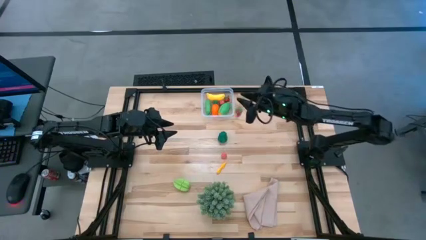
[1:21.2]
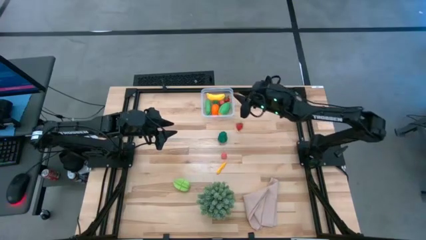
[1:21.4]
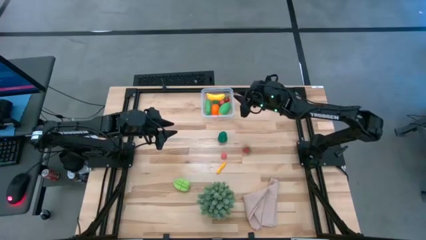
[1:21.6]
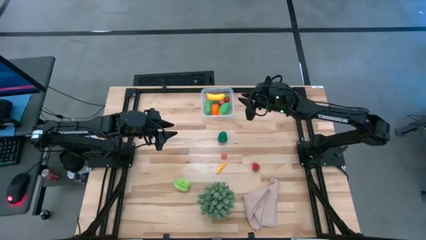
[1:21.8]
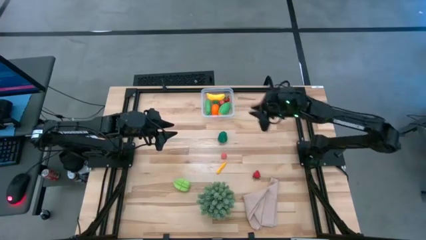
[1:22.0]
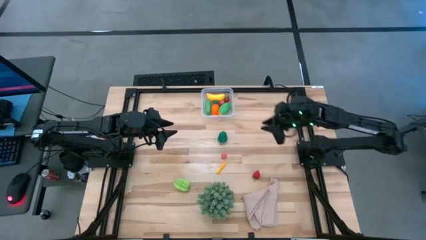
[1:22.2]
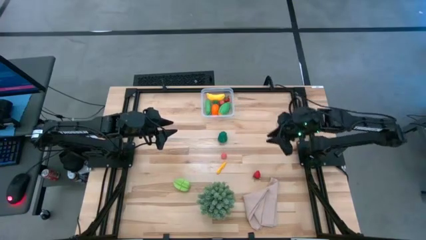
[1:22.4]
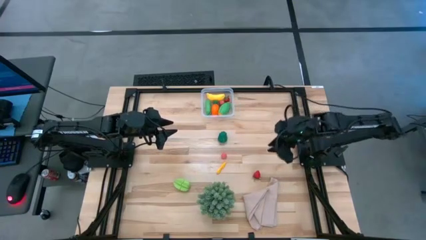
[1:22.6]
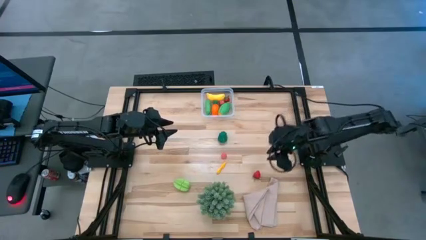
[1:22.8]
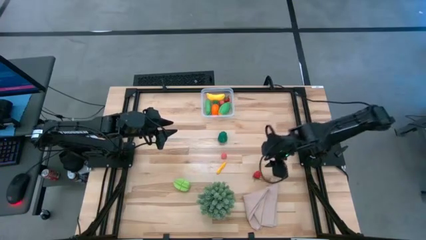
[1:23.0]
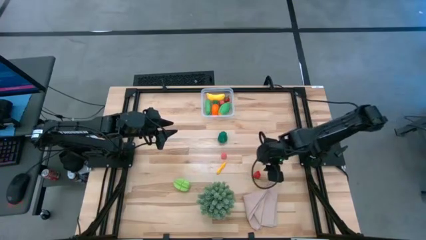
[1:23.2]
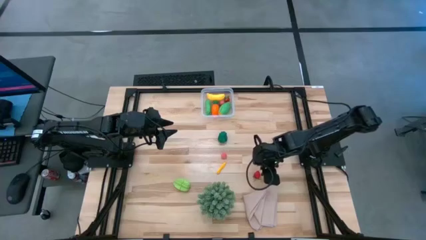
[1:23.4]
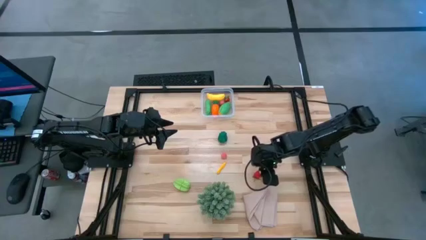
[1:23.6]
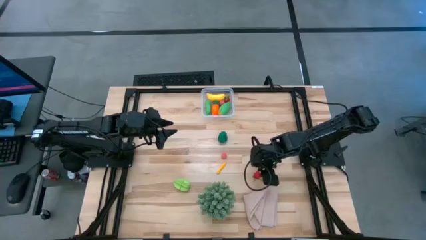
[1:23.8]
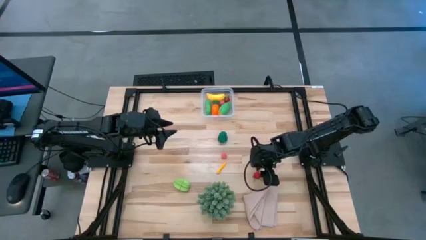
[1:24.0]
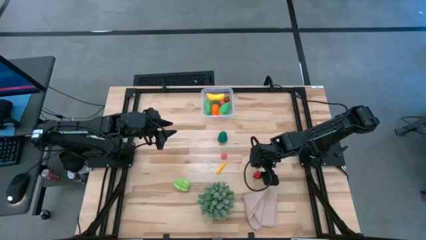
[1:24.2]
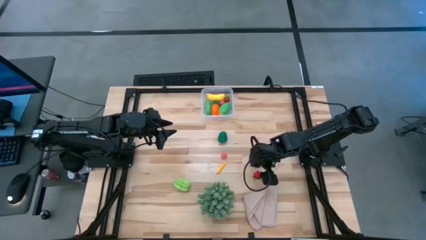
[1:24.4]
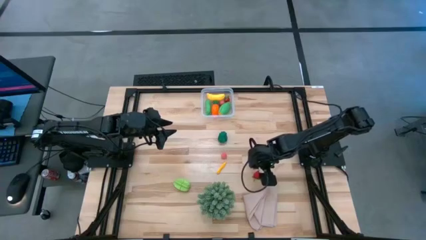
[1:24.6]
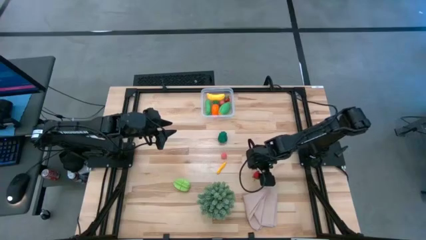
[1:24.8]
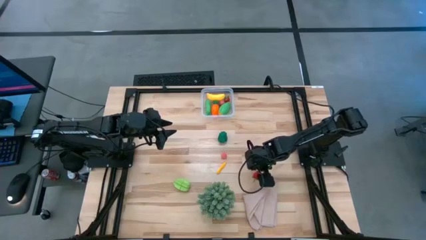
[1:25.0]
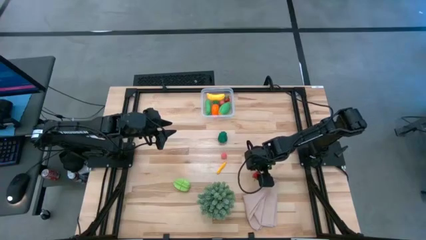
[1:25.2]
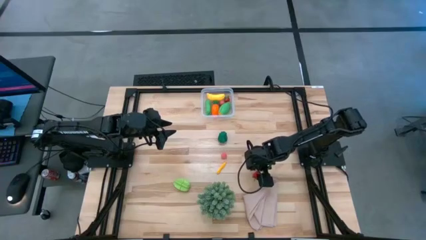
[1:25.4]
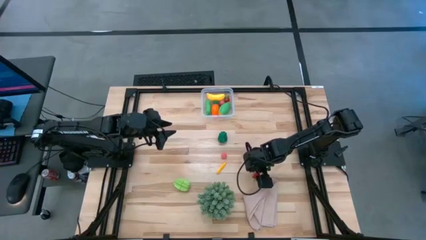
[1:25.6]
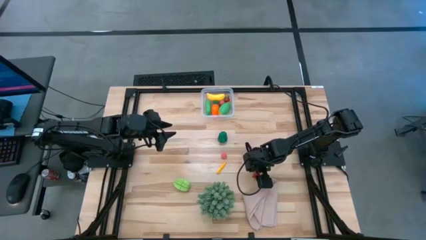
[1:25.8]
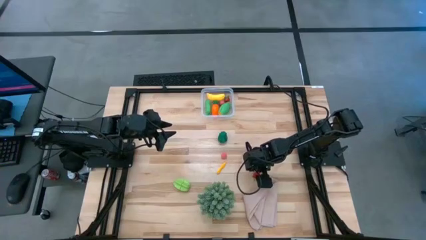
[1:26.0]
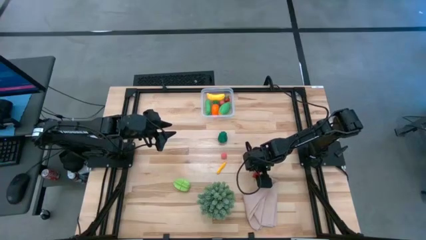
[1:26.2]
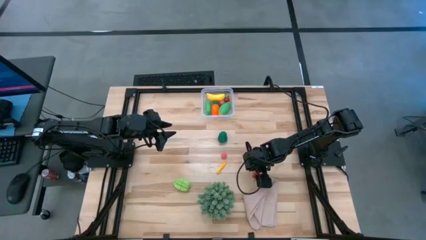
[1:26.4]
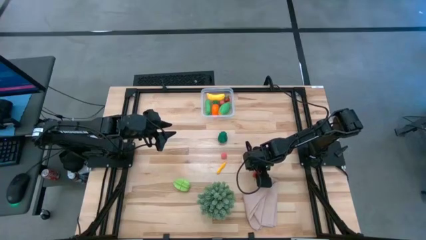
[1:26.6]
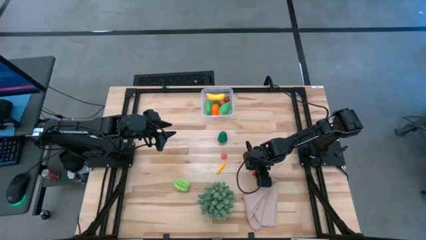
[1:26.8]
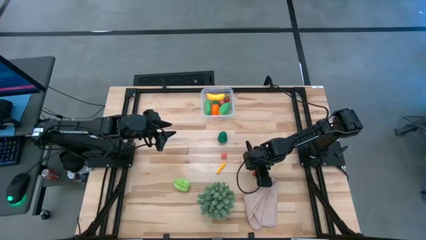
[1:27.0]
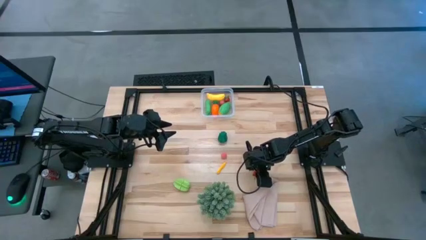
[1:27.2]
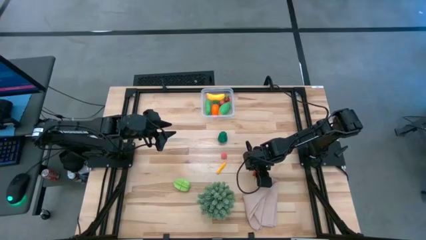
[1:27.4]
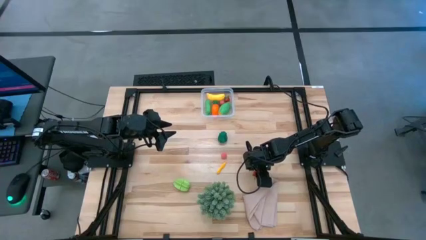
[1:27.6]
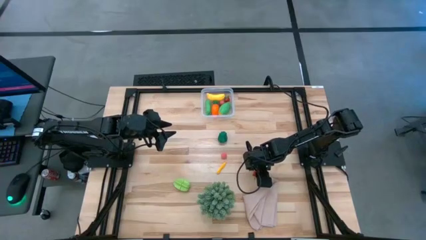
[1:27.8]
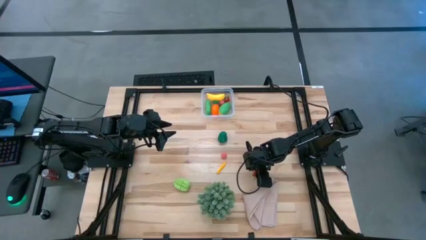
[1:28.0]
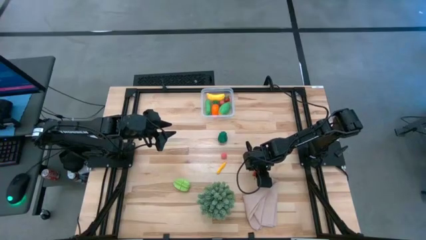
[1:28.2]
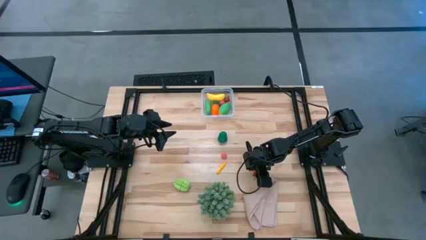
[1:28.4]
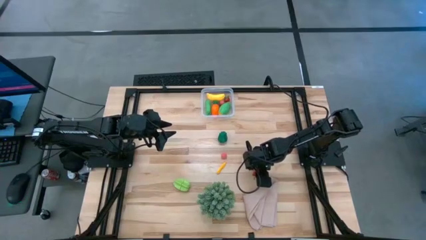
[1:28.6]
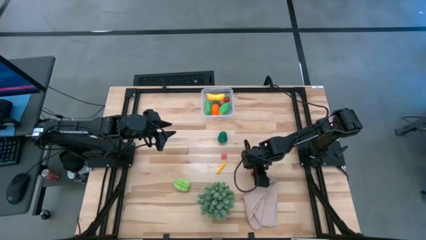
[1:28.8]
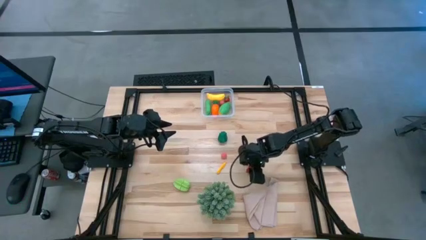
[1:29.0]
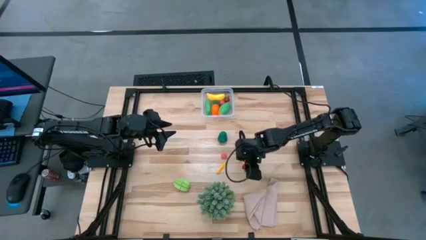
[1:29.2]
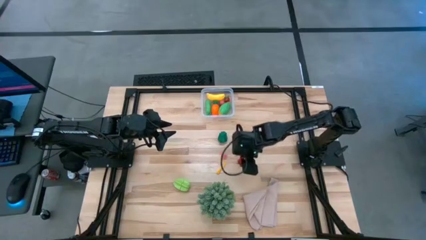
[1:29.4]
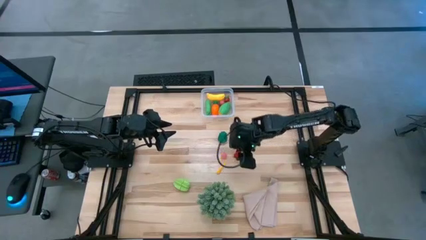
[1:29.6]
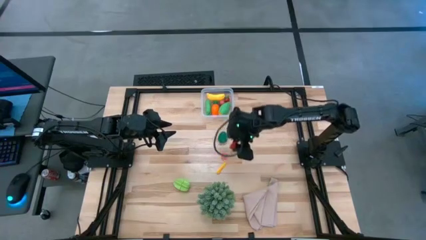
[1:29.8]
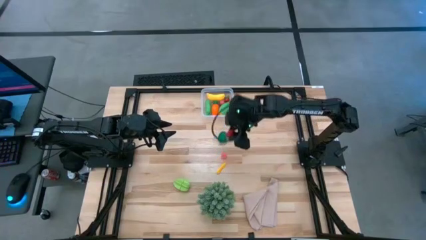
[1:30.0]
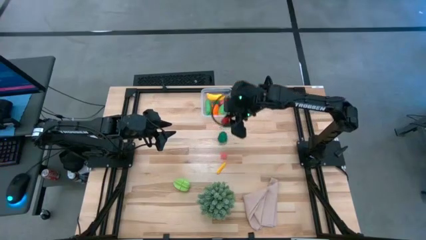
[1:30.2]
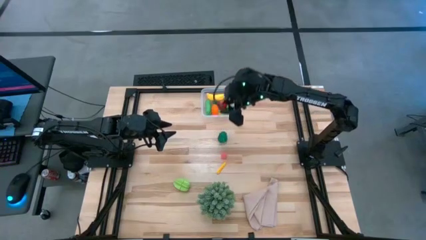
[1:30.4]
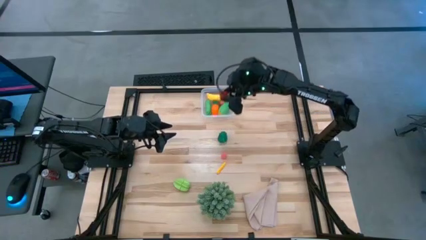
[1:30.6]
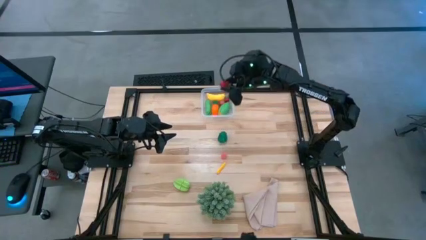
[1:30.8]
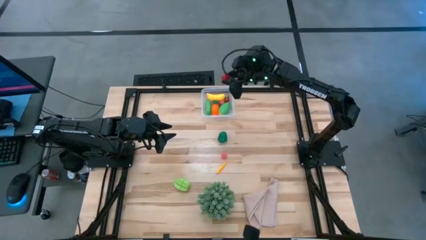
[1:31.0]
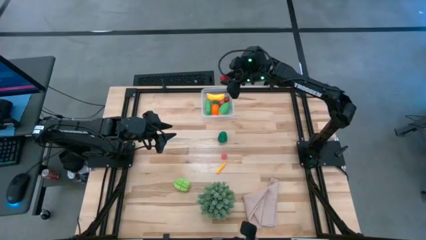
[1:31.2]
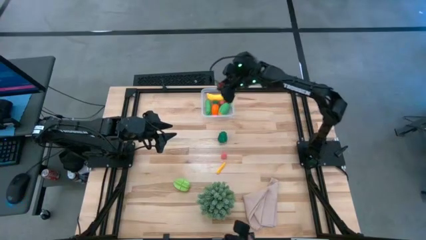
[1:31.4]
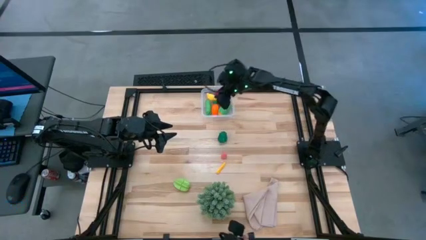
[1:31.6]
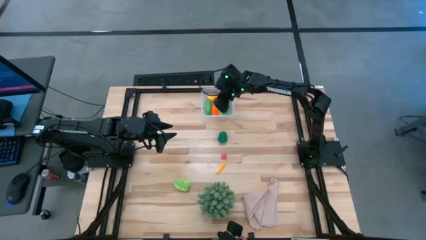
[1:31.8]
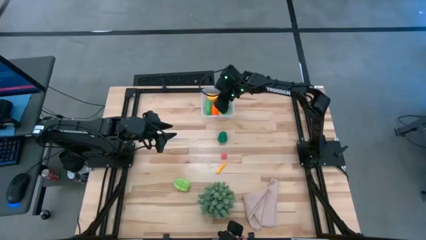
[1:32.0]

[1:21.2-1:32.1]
Task: Pick and placing Produce into tupperware
Put the strawberry into the transparent bin

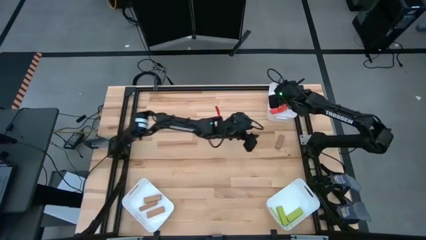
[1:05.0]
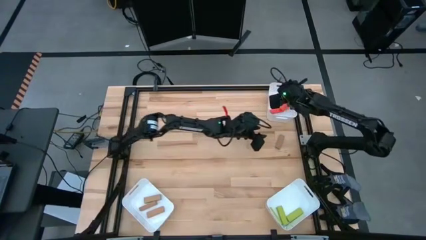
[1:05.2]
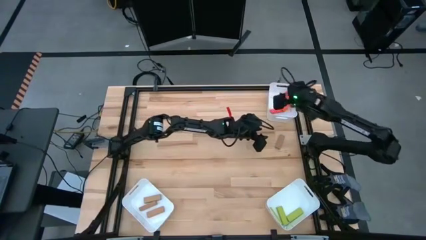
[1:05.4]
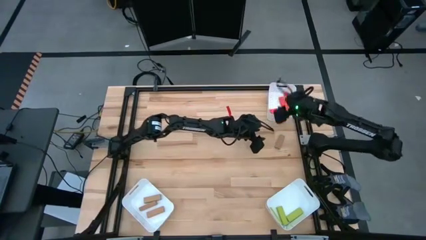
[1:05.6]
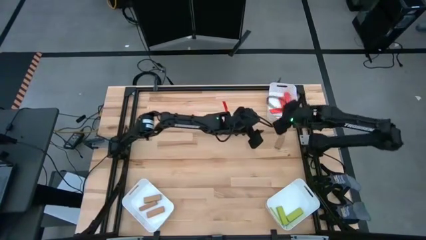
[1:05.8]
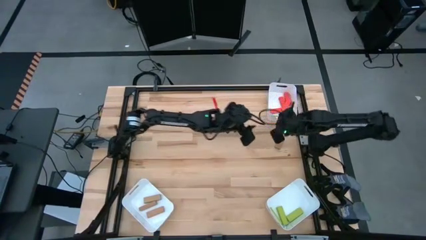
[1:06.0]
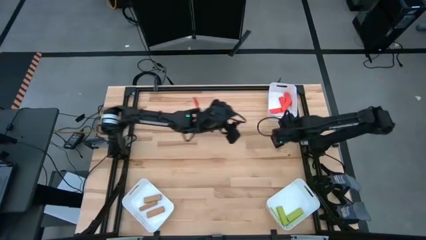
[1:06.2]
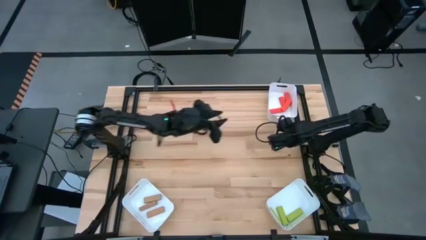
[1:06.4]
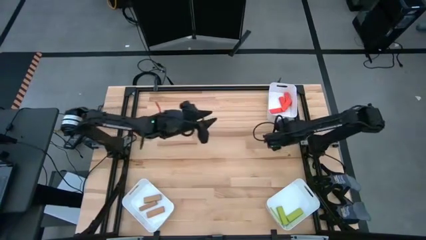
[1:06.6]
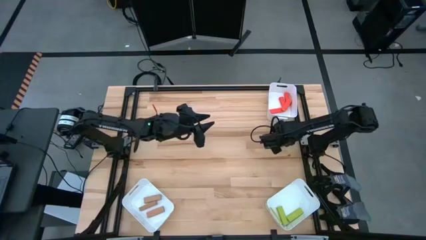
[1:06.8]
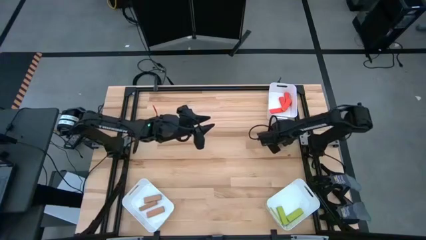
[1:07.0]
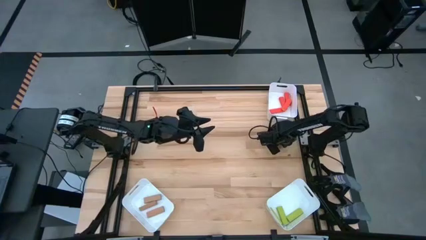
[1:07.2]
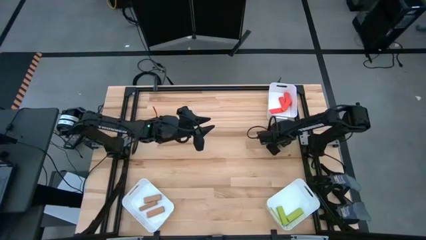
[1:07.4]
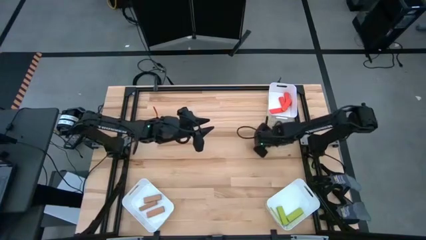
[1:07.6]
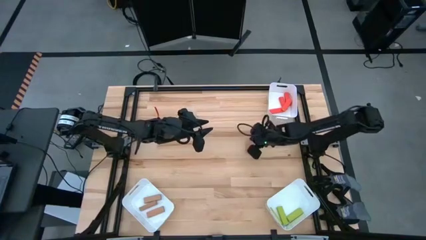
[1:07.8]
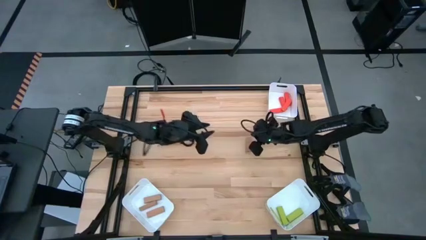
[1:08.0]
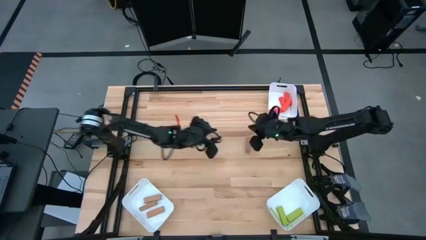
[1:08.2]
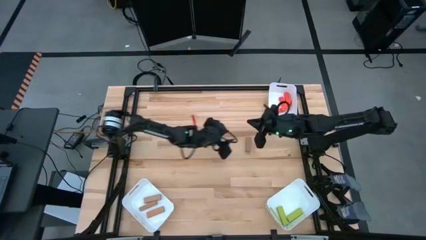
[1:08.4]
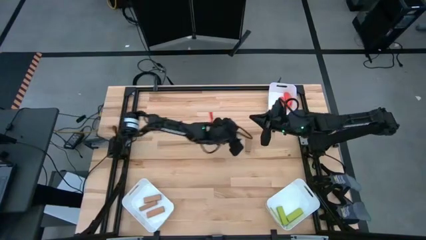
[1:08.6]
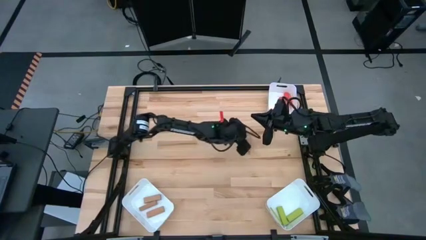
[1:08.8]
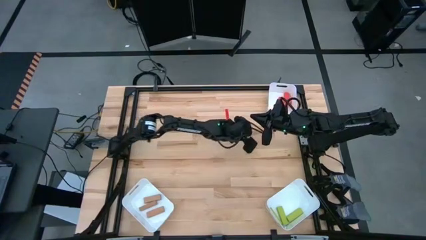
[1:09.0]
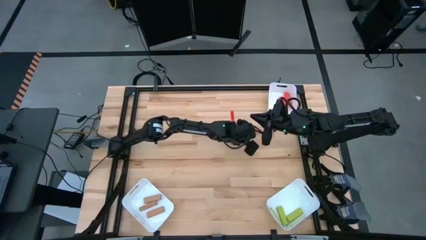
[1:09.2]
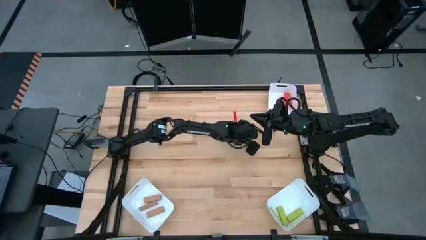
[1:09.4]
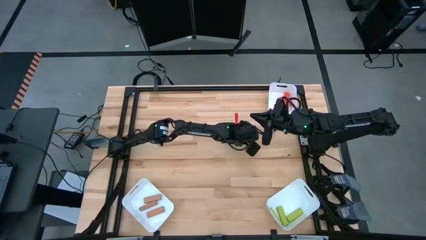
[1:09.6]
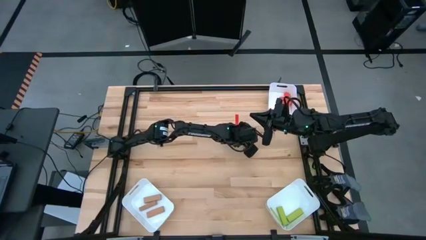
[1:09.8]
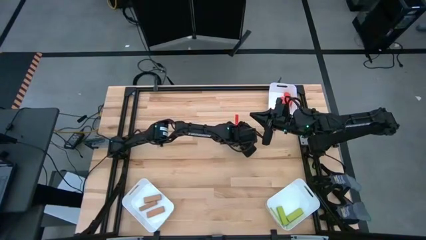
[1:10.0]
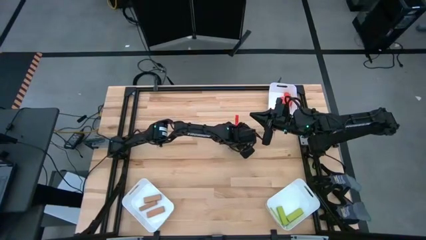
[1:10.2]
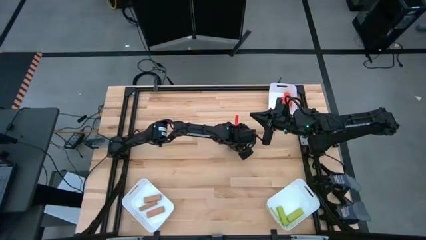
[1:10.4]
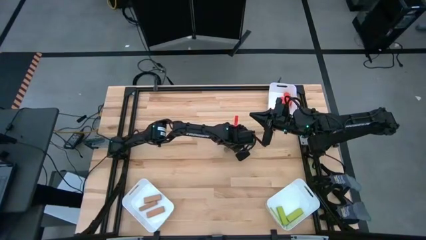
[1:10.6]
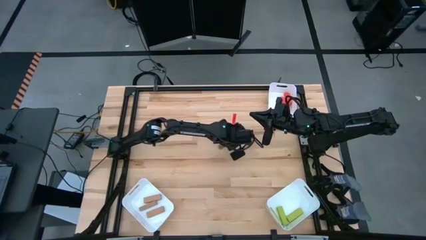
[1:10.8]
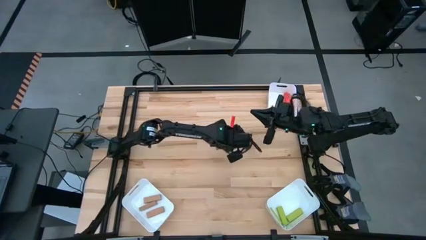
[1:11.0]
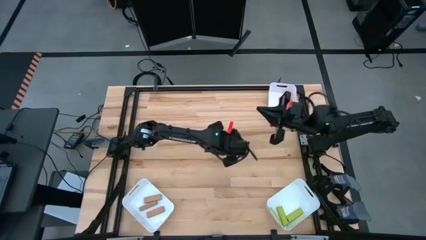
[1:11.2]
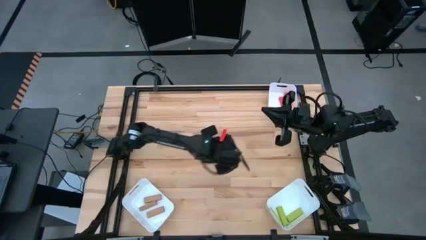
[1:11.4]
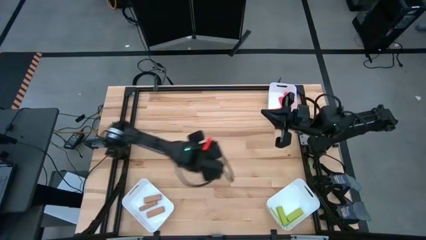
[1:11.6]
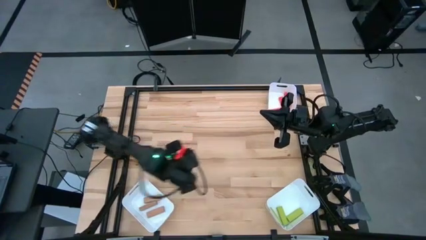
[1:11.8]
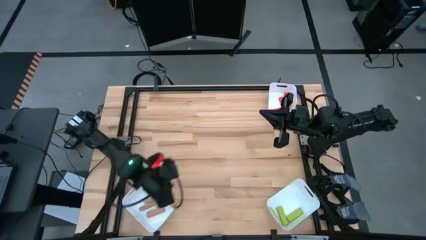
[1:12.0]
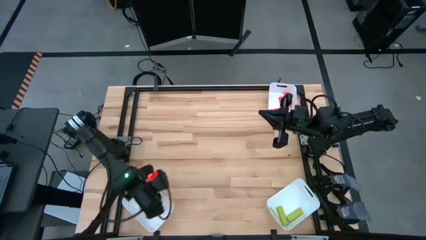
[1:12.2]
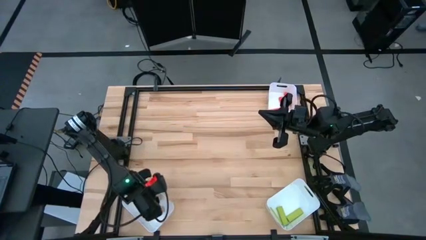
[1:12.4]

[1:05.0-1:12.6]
Task: Sort blocks
Put the brown block into the bottom left bin
